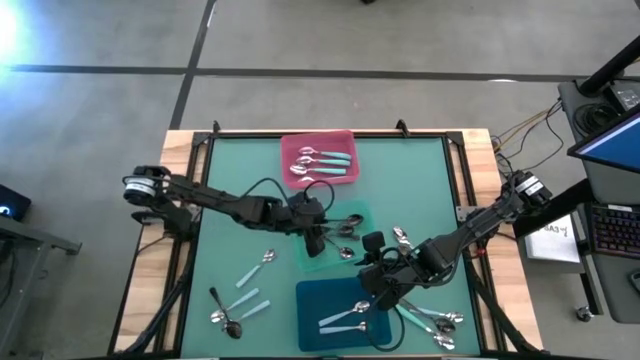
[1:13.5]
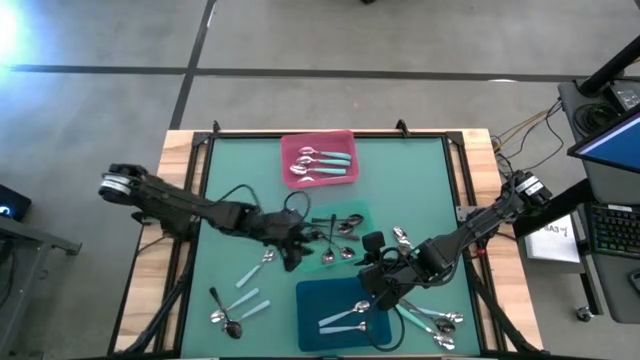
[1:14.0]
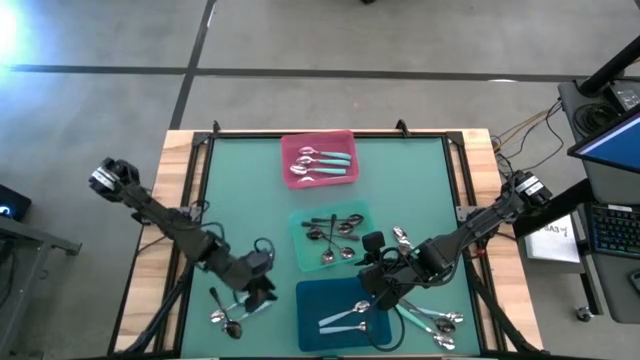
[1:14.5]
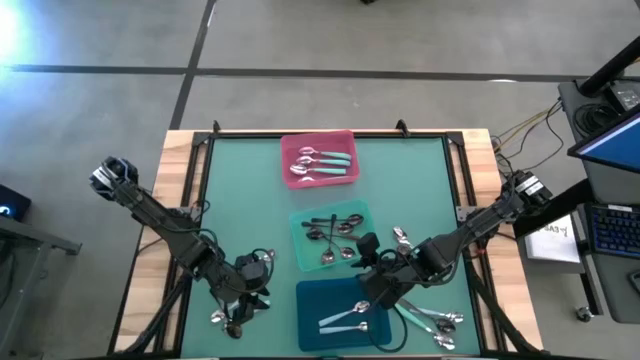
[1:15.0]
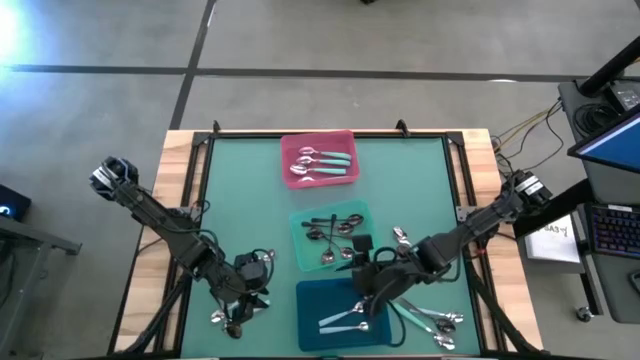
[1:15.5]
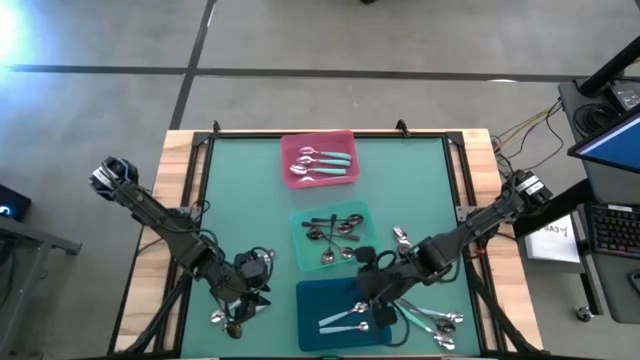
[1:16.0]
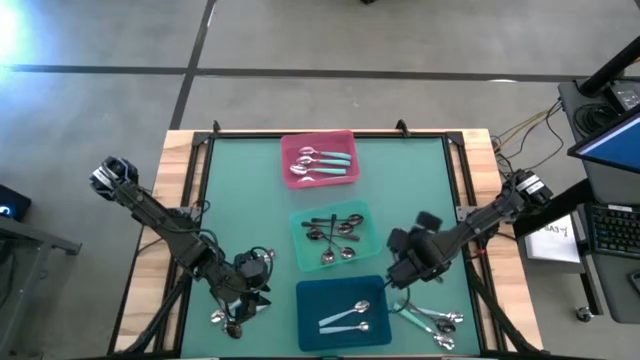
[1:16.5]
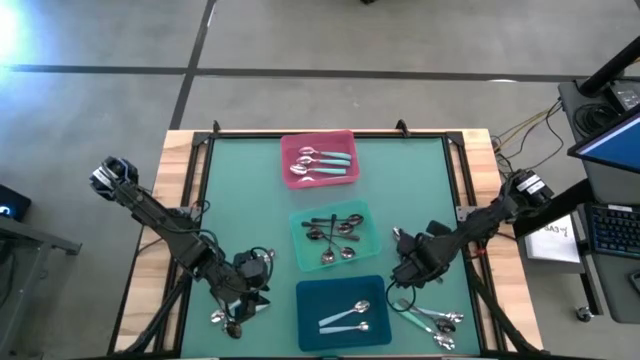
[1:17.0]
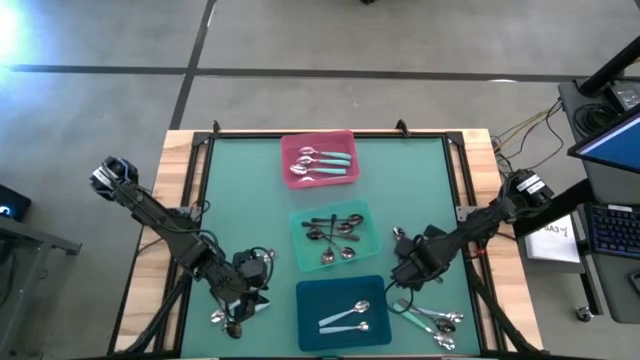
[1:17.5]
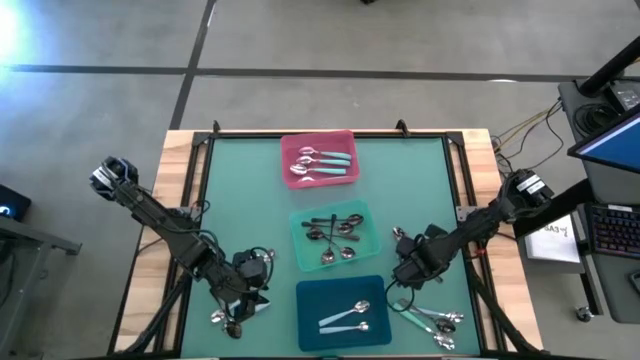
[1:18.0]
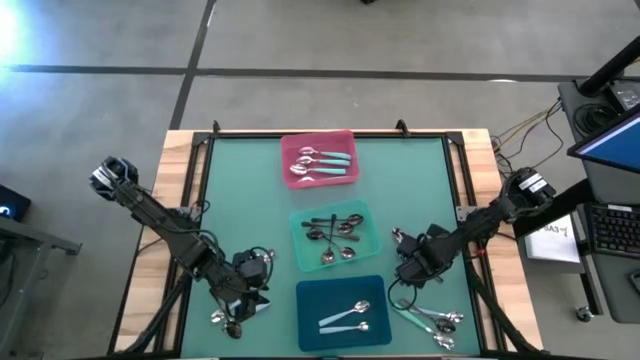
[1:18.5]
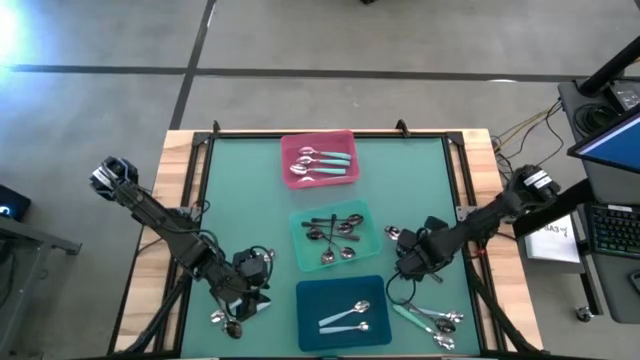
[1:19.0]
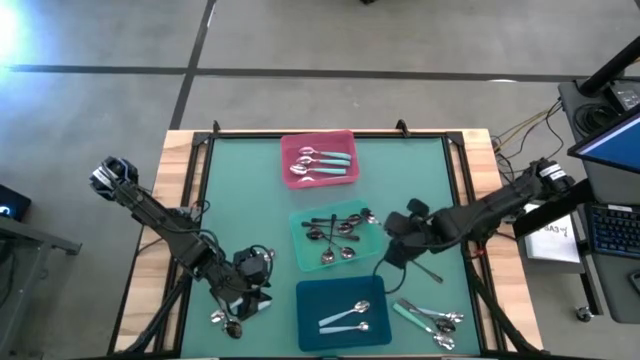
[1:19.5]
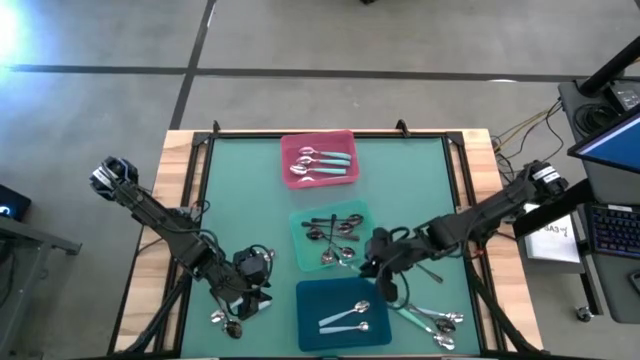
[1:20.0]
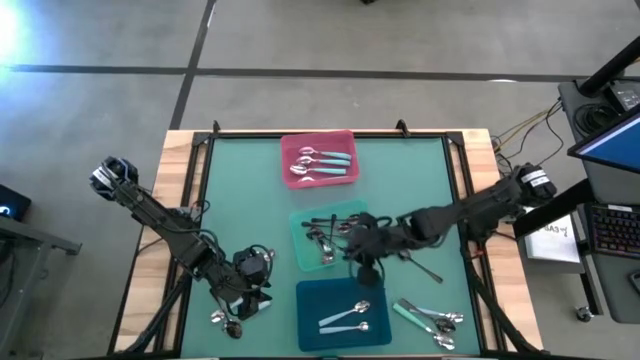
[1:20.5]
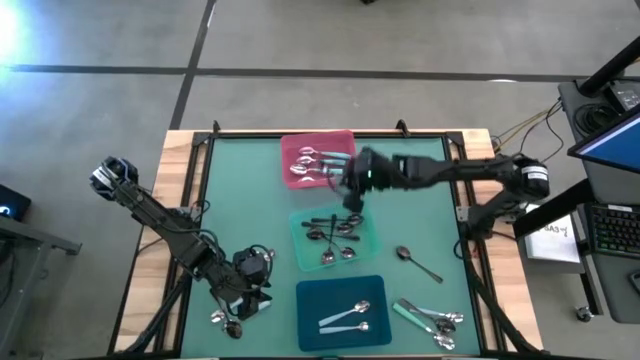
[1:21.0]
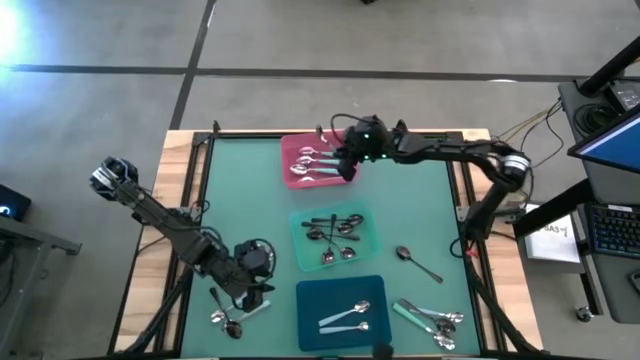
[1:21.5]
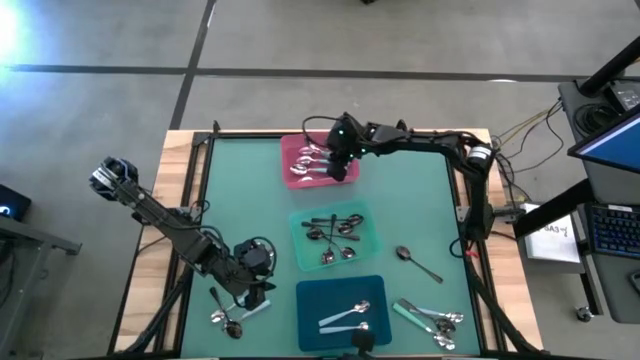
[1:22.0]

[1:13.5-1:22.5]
Task: Sort silverware by color (type)
Put the green spoon into the pink bin

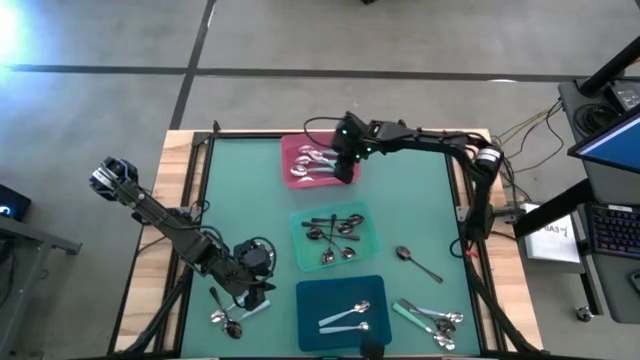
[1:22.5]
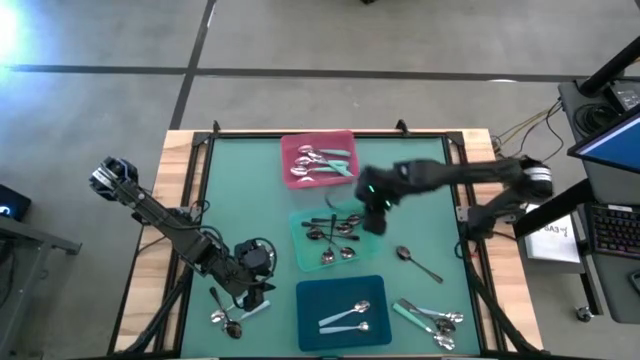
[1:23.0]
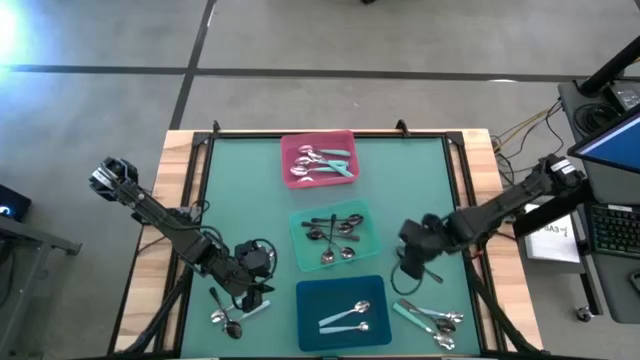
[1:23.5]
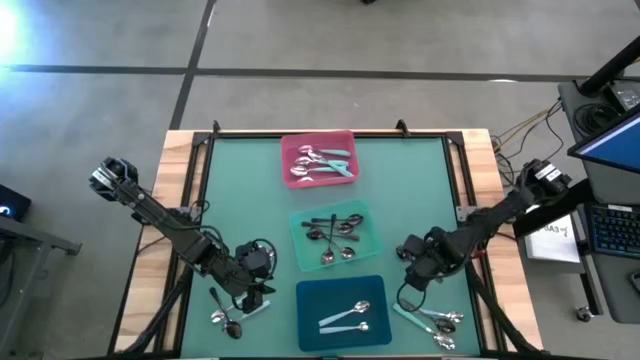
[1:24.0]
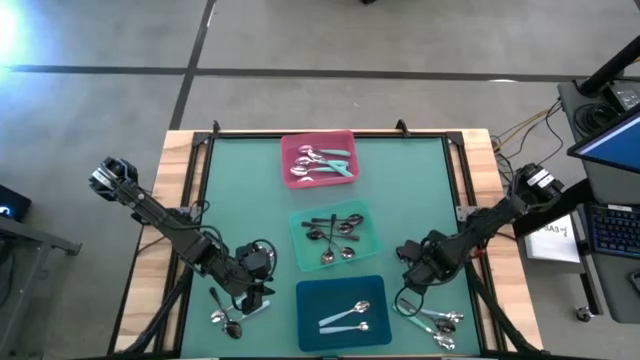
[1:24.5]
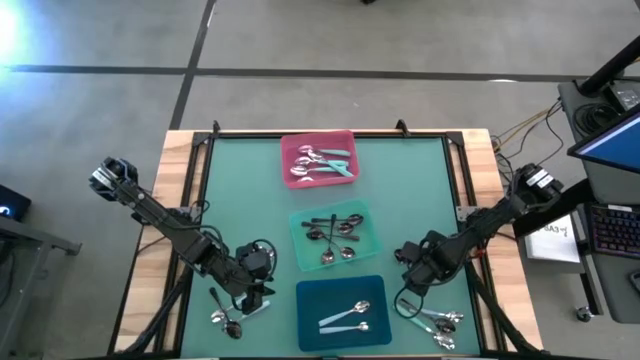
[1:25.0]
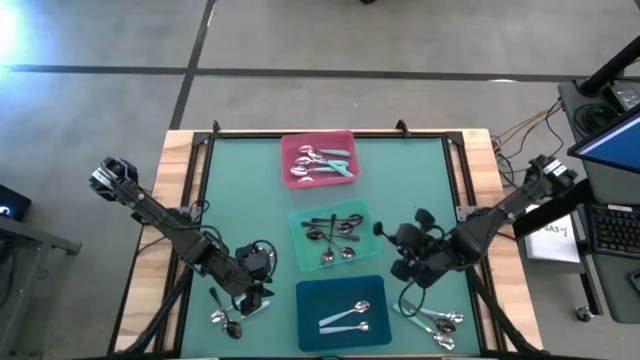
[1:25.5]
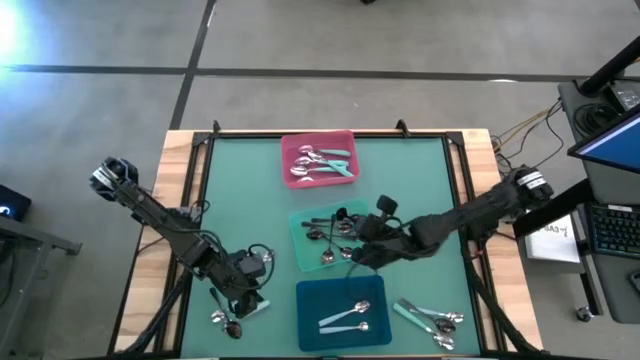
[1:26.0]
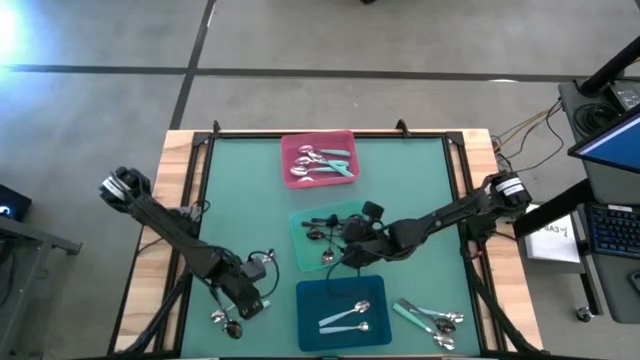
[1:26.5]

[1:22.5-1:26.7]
Put the black spoon into the green bin

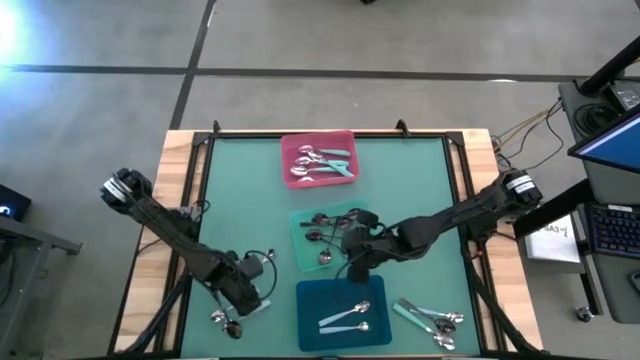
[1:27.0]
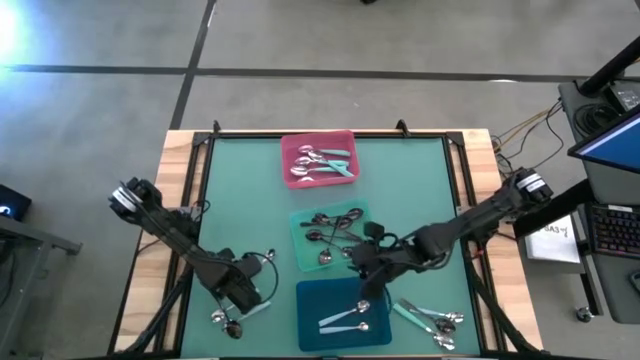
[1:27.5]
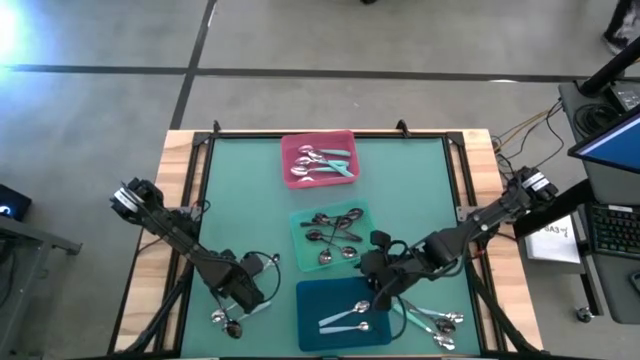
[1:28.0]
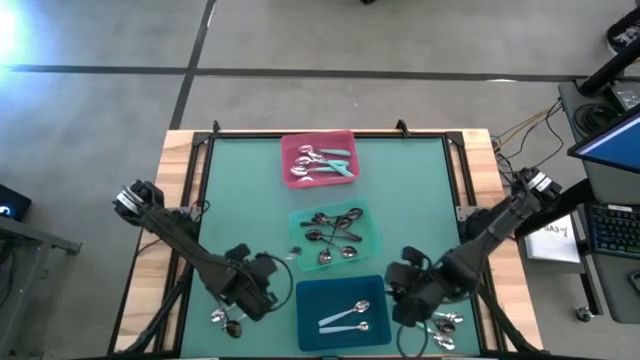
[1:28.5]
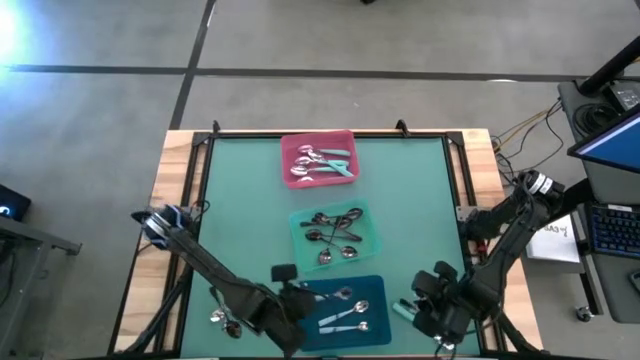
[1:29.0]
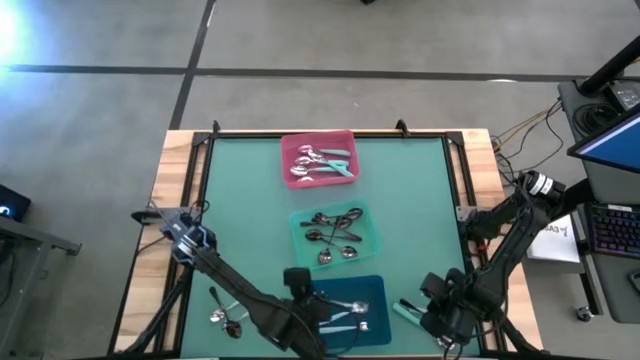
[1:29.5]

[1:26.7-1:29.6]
Put the blue spoon into the blue bin

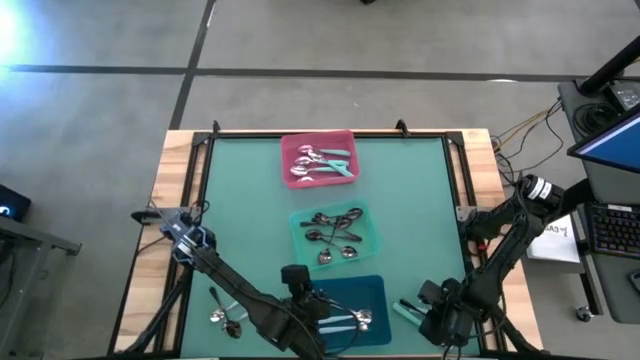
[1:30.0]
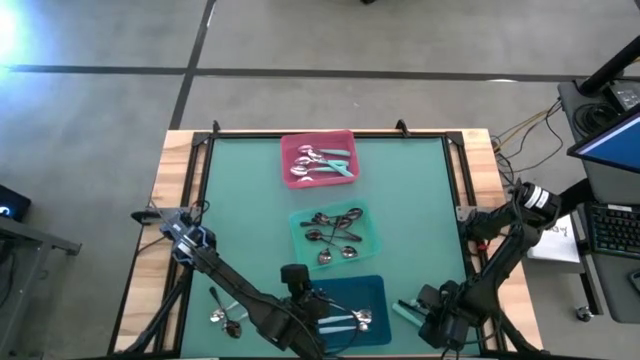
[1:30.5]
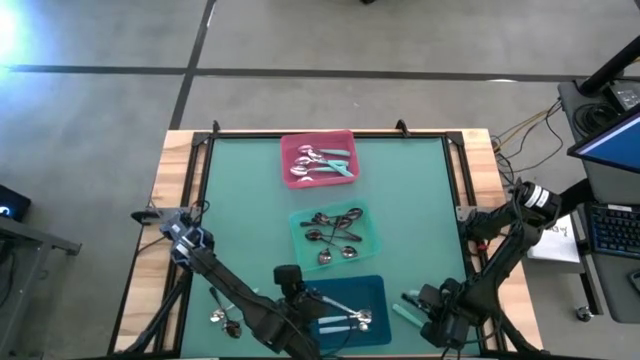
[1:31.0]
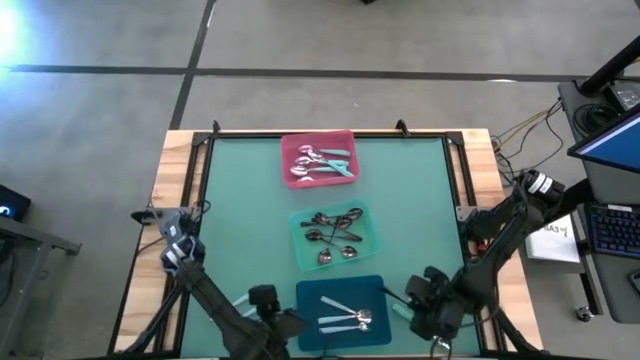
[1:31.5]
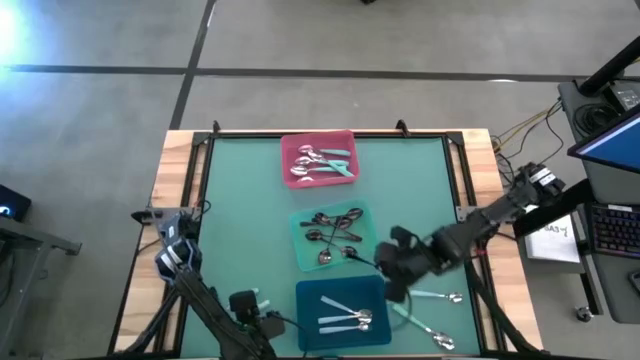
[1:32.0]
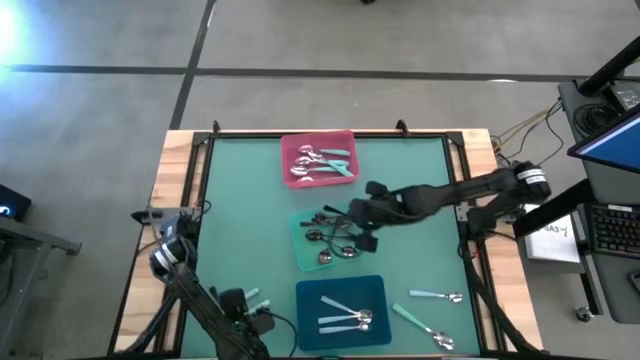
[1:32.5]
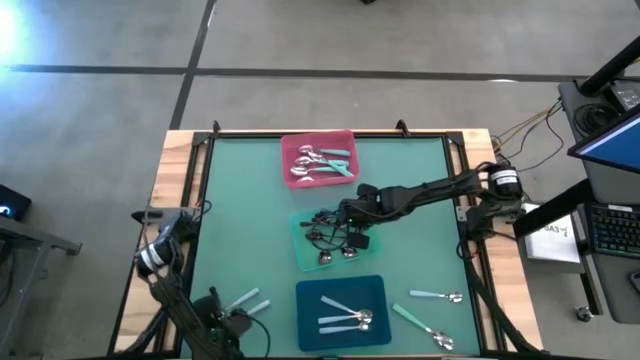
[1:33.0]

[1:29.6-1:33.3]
Put the black spoon into the green bin

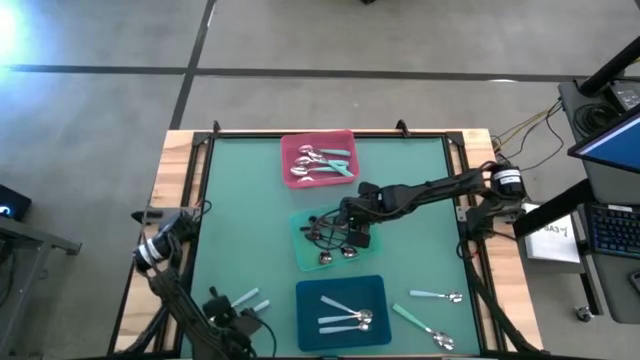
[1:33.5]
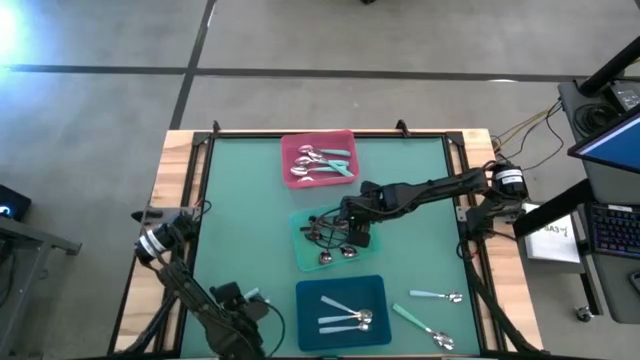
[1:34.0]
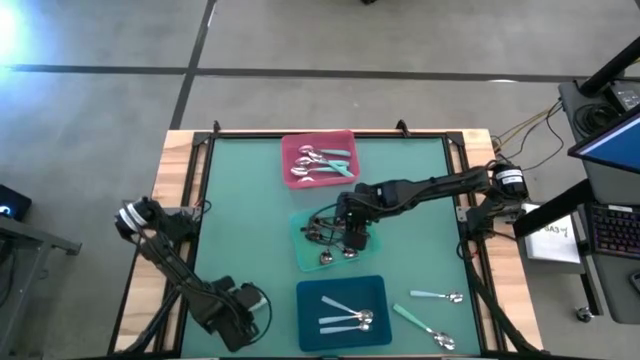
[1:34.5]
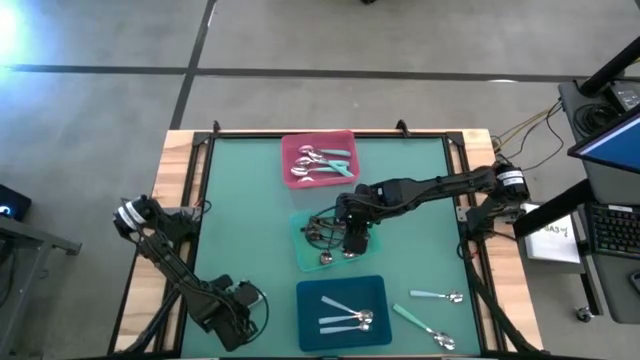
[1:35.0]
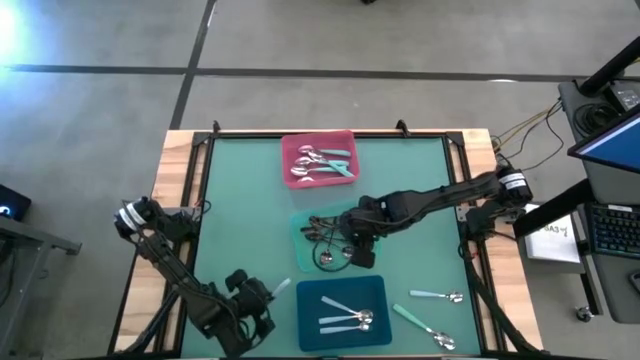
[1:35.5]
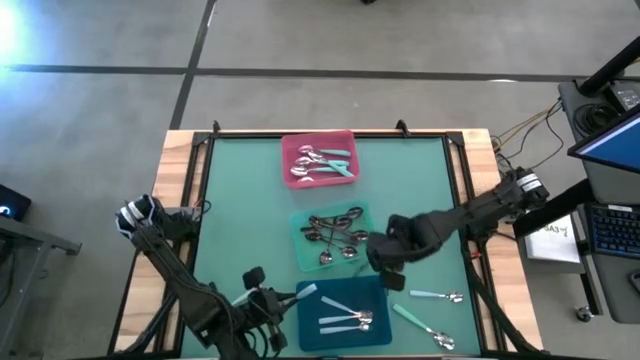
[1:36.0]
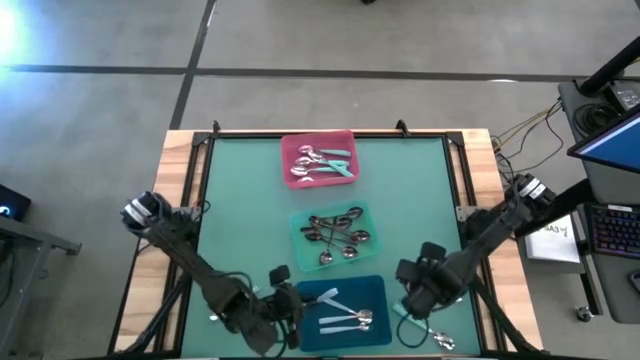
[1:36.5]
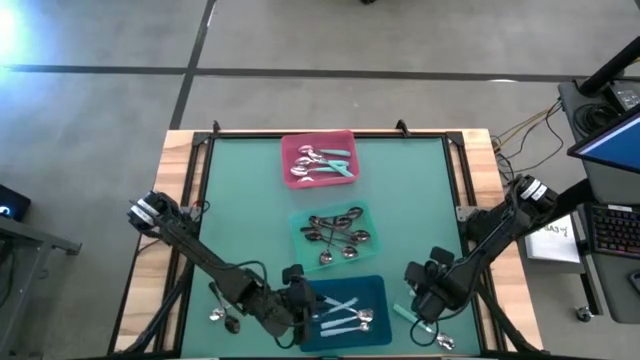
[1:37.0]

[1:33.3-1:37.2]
Put the blue spoon into the blue bin
